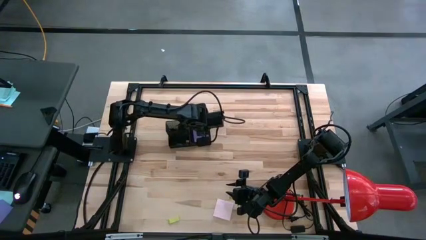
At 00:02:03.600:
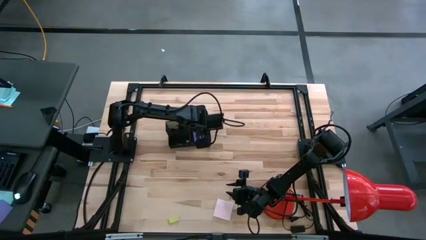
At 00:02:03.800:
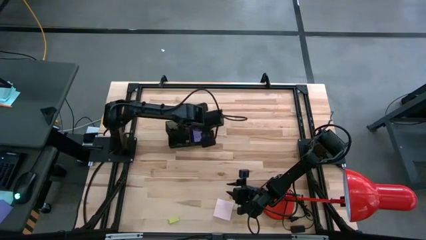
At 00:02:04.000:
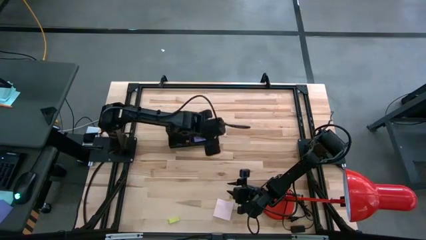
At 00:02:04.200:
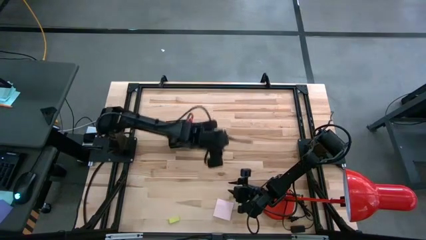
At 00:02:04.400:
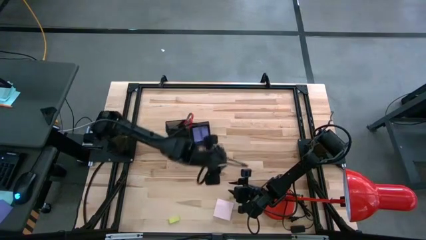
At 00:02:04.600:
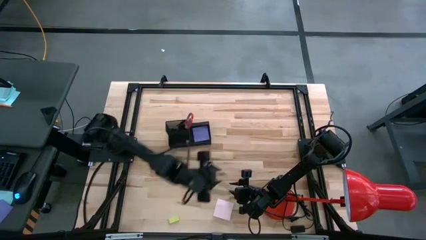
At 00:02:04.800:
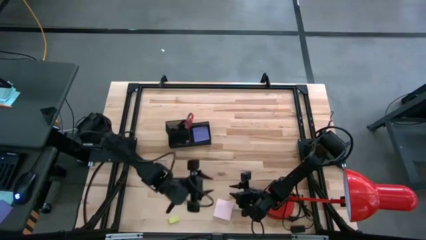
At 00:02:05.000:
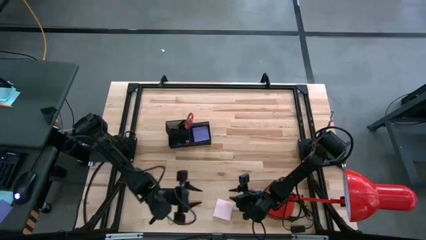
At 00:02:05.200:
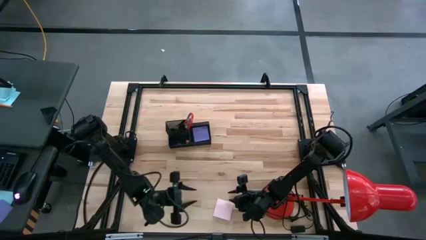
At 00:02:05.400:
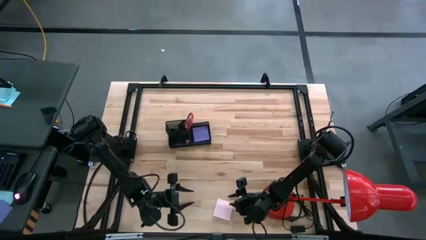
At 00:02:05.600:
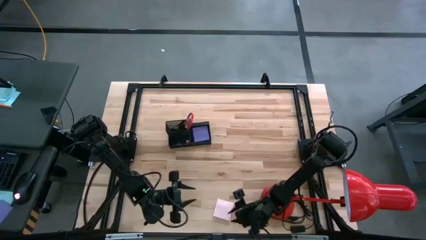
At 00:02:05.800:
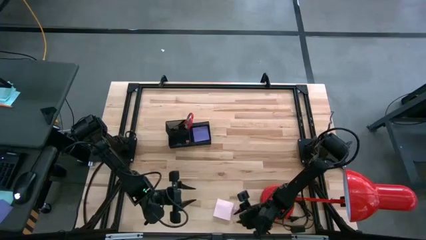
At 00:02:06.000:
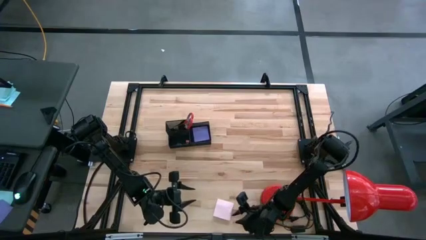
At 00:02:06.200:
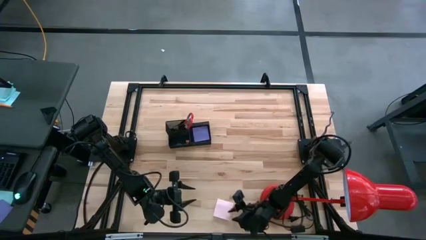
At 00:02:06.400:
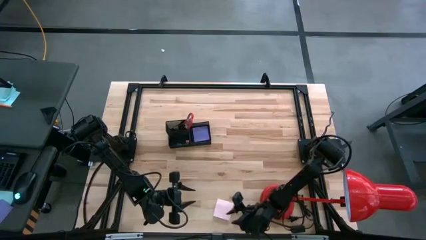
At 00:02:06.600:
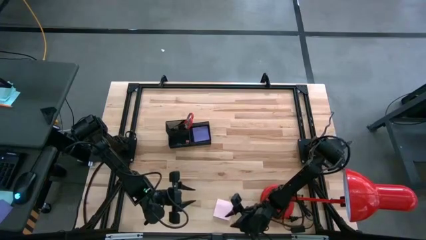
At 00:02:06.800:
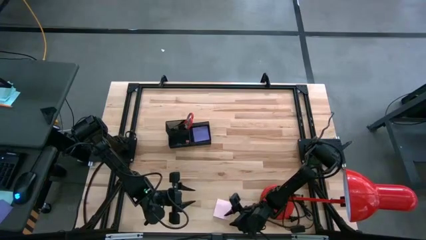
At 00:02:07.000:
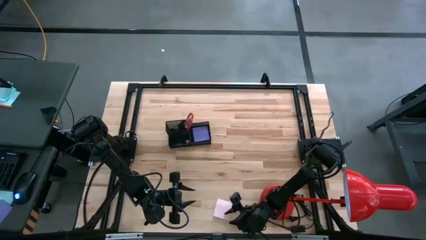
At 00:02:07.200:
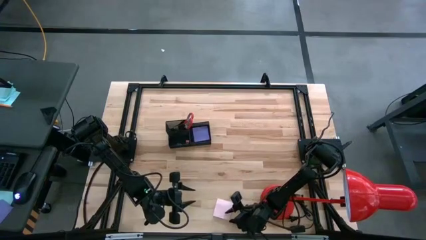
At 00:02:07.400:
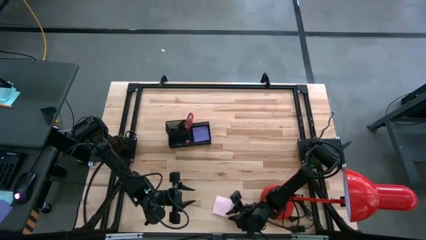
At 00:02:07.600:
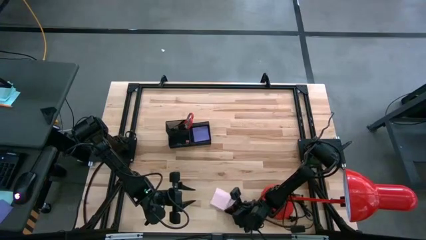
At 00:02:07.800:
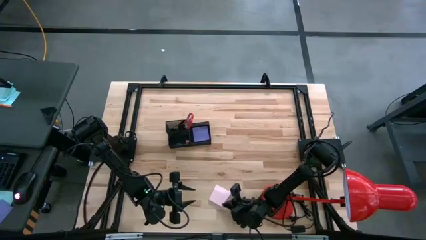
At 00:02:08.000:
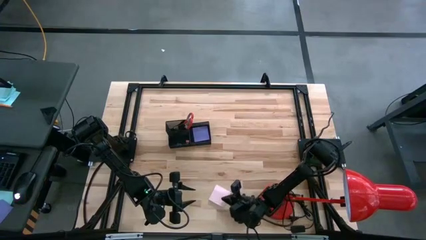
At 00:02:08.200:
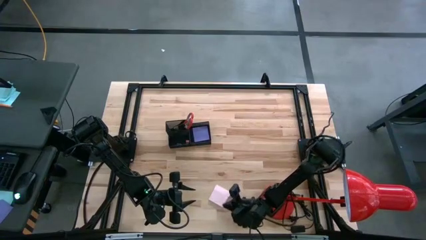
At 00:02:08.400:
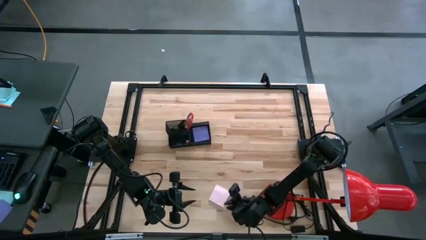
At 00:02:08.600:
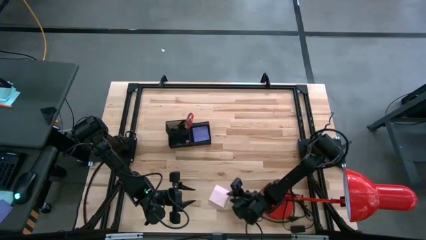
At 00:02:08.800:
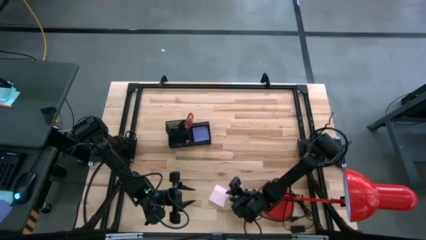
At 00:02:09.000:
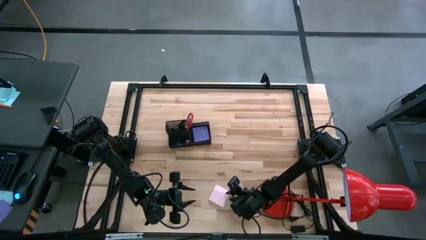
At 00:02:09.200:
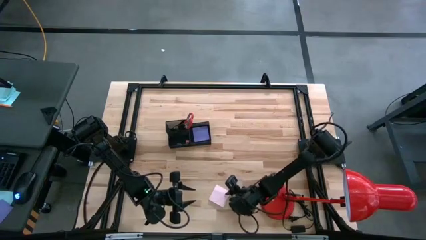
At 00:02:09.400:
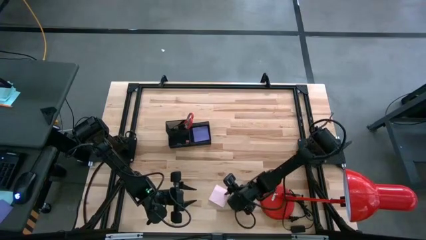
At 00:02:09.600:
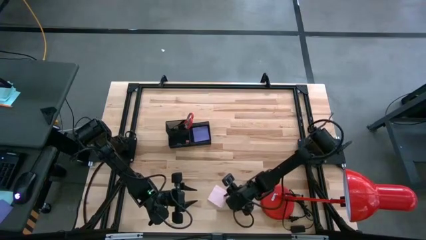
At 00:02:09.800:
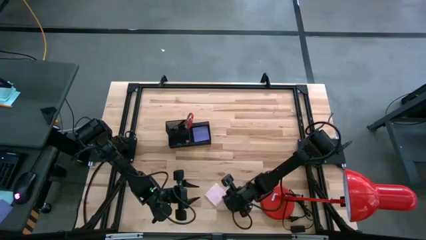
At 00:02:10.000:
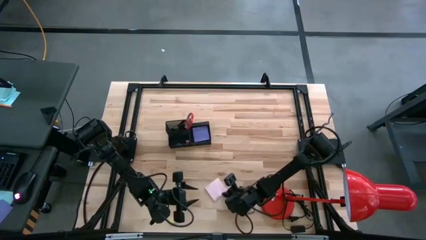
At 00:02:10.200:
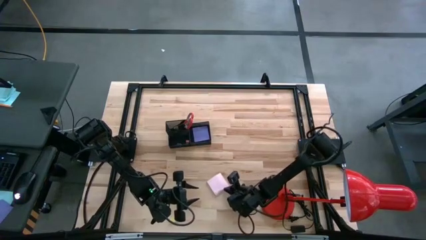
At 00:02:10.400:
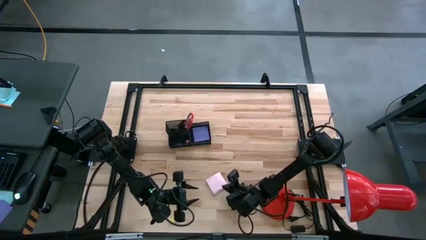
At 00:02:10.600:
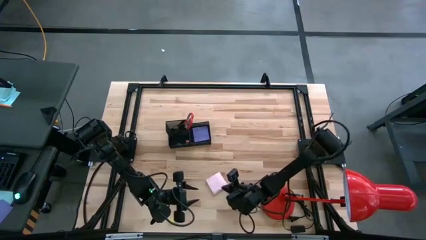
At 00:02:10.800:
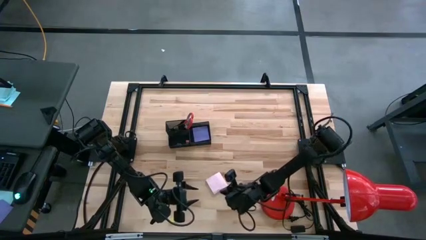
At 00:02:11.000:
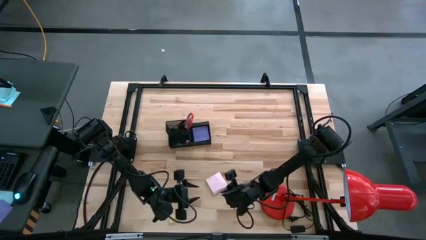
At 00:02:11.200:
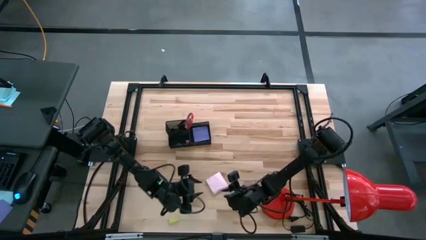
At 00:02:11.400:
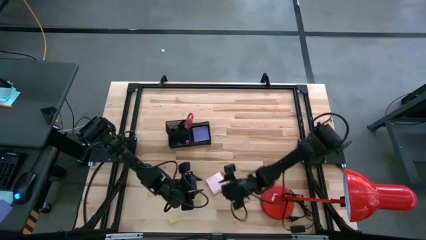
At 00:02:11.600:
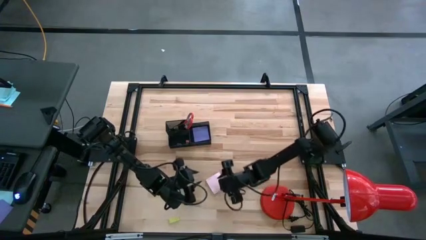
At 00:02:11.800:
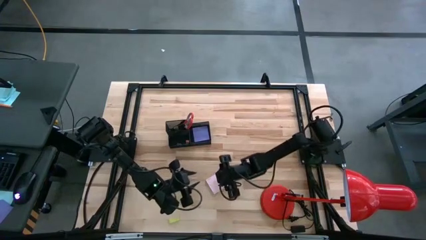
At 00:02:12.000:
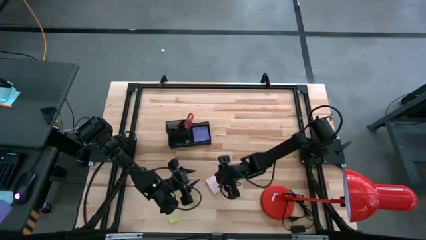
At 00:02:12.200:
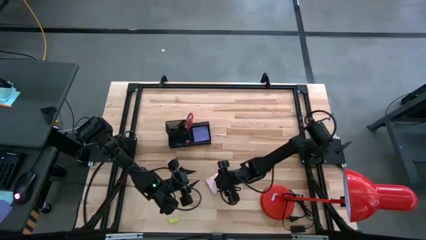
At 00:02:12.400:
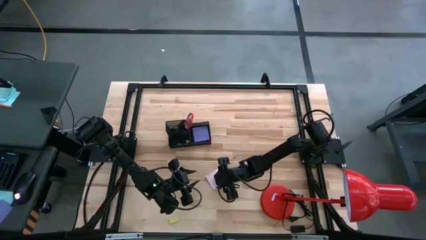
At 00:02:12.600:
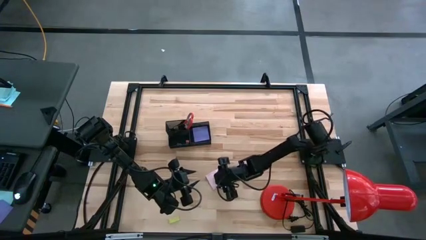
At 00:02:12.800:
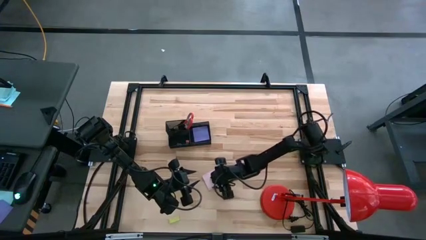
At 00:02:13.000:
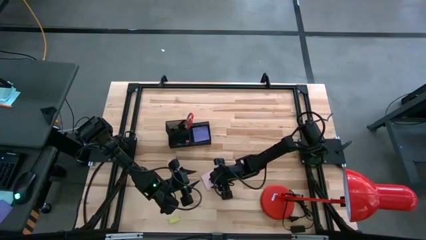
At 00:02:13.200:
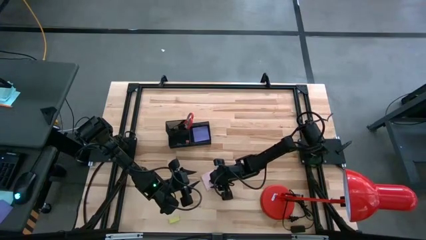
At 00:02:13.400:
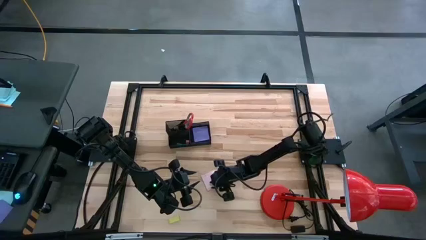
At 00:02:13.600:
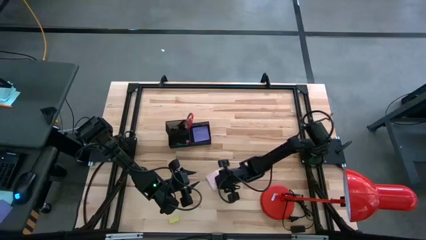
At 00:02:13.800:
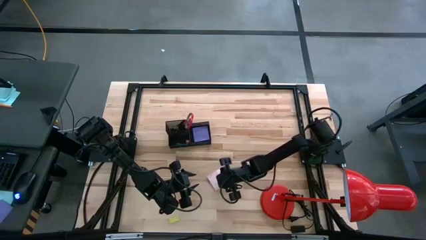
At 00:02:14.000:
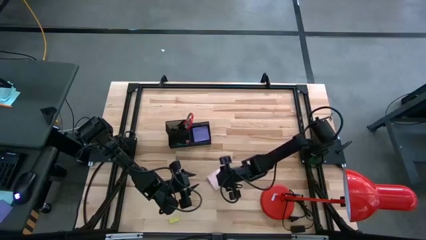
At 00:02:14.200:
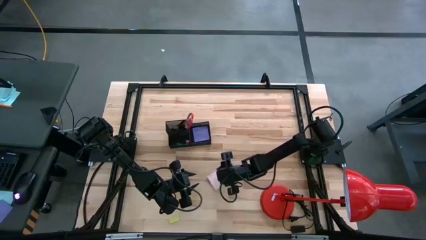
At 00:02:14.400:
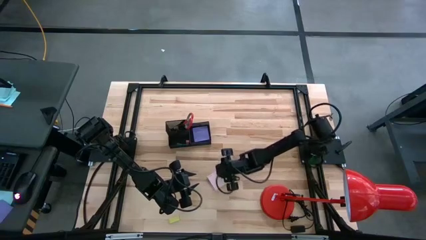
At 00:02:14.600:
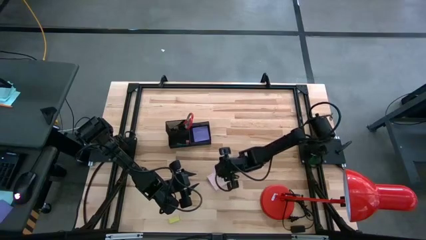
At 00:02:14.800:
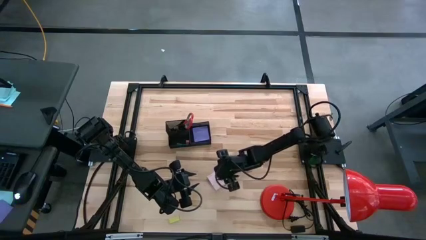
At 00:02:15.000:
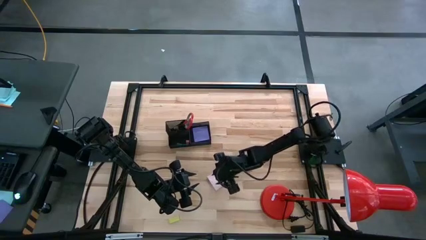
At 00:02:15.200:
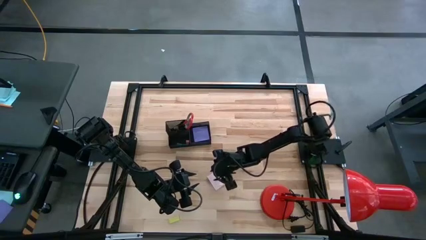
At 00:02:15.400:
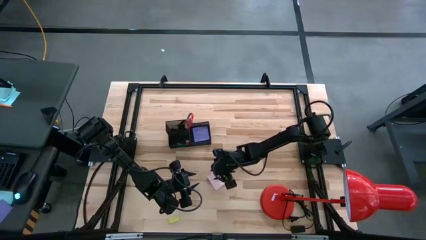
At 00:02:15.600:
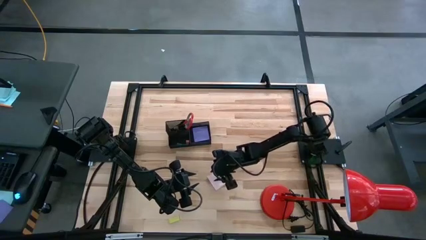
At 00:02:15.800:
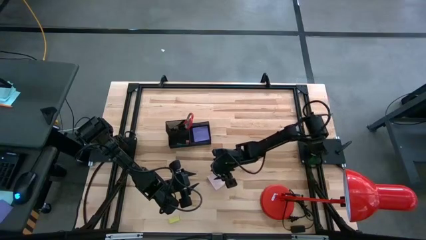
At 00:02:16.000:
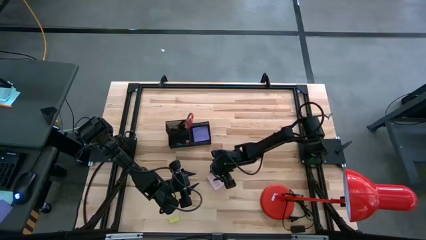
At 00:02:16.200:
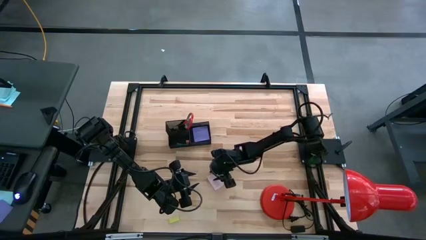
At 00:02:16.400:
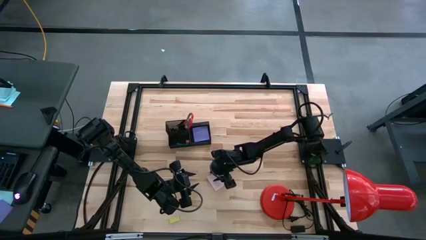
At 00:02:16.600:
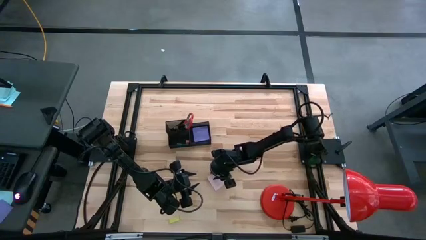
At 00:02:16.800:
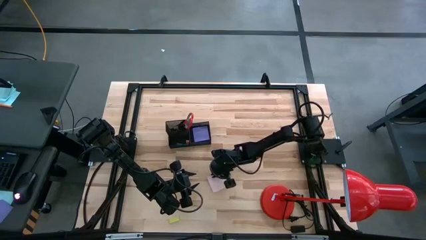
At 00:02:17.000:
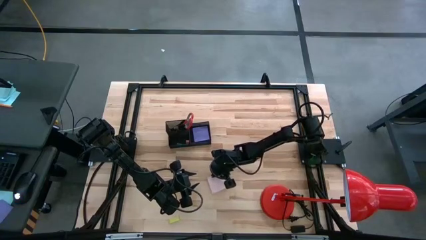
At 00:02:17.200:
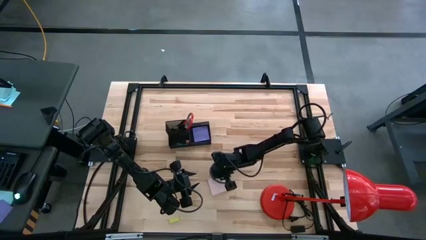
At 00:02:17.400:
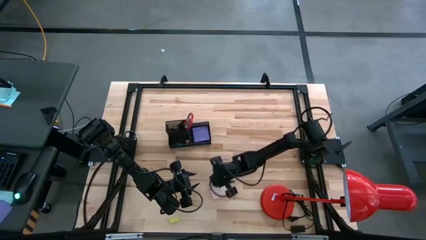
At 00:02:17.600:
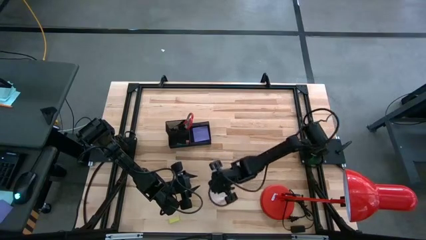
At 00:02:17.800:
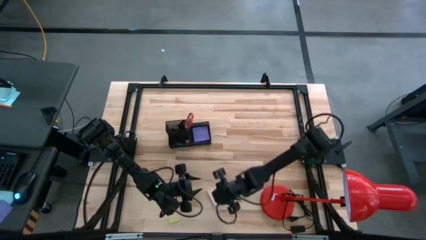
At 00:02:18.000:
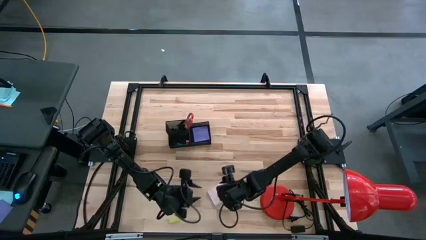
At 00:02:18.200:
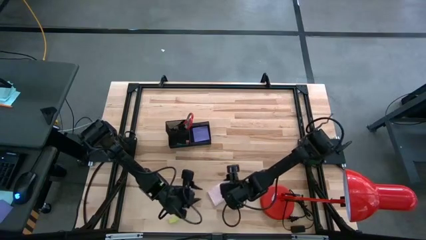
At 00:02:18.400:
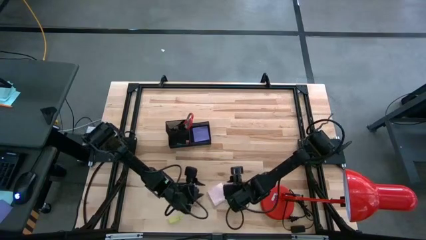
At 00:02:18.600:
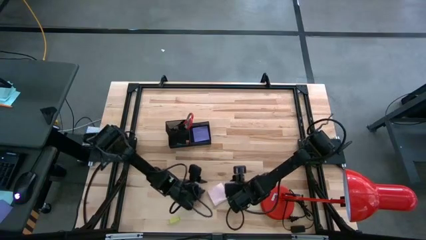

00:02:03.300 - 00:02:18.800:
Task: Pick and place office supplies into organizer
Put the pink sticky note into the desk organizer
